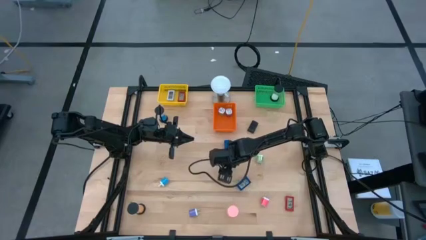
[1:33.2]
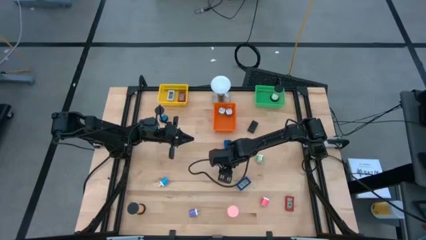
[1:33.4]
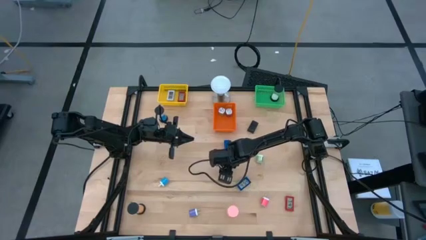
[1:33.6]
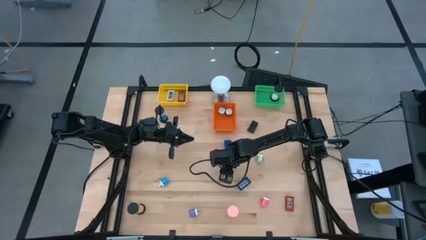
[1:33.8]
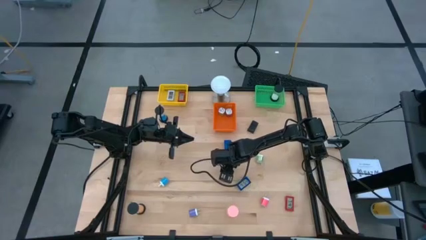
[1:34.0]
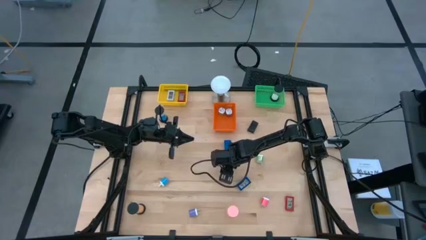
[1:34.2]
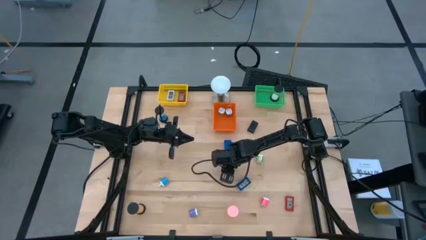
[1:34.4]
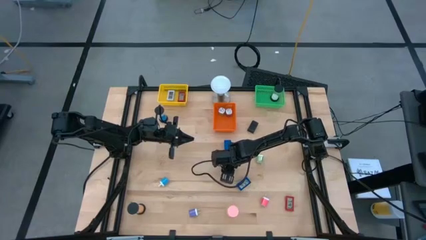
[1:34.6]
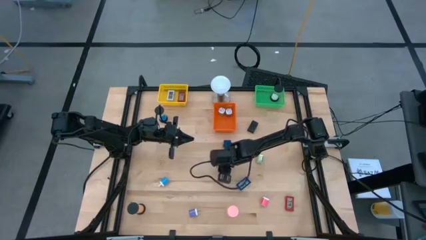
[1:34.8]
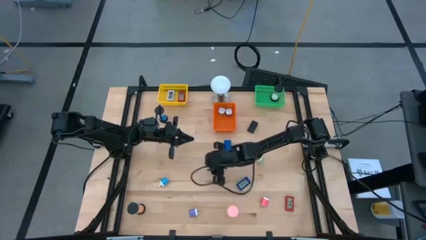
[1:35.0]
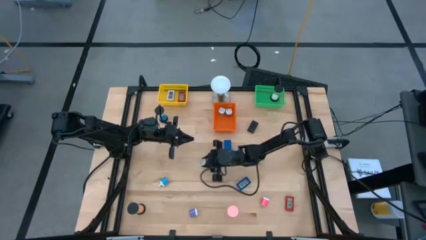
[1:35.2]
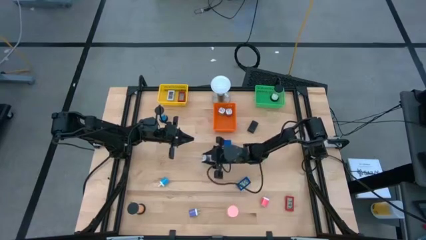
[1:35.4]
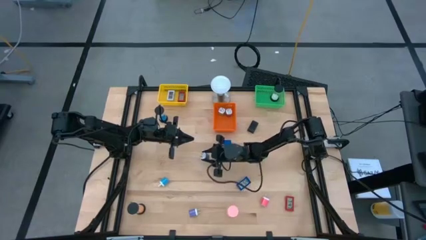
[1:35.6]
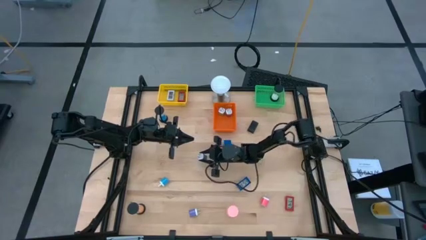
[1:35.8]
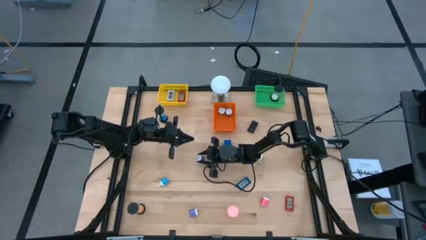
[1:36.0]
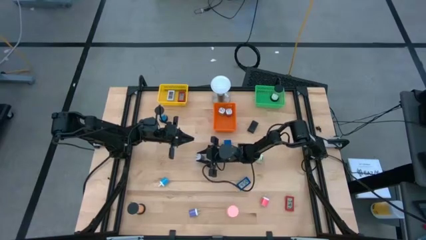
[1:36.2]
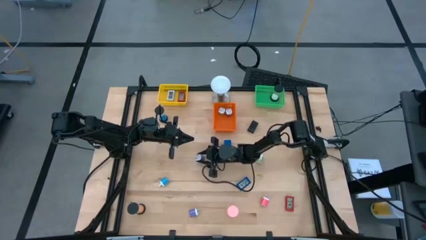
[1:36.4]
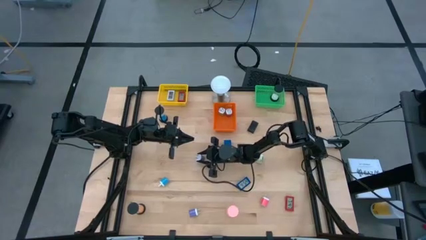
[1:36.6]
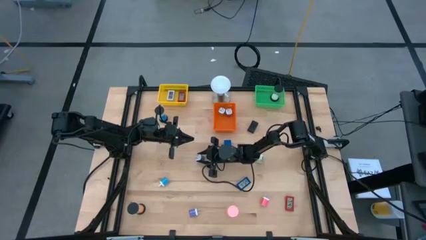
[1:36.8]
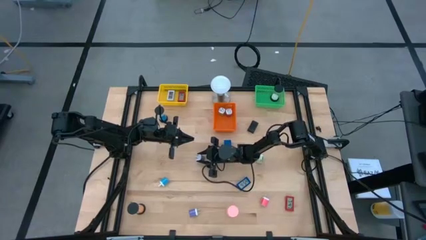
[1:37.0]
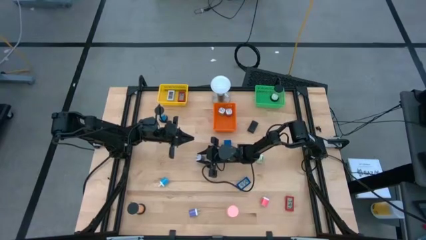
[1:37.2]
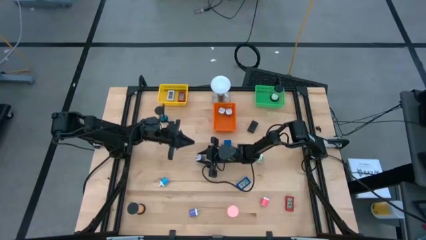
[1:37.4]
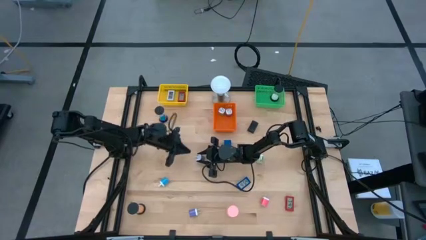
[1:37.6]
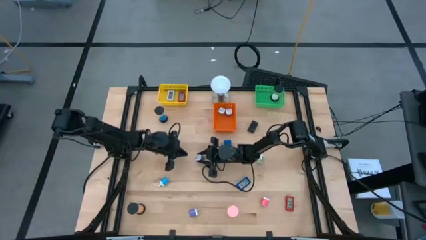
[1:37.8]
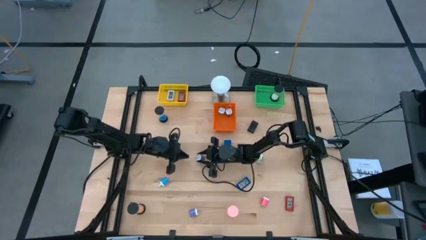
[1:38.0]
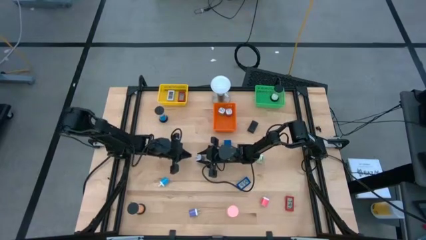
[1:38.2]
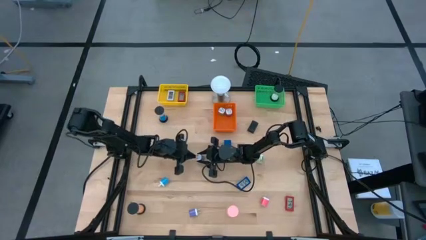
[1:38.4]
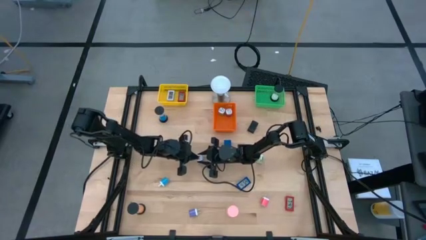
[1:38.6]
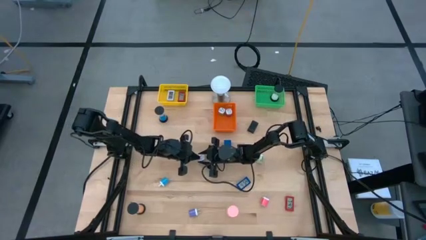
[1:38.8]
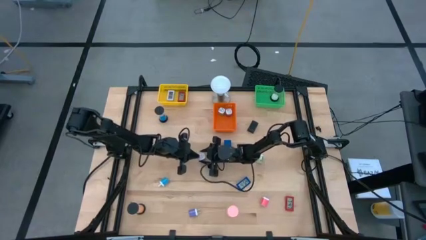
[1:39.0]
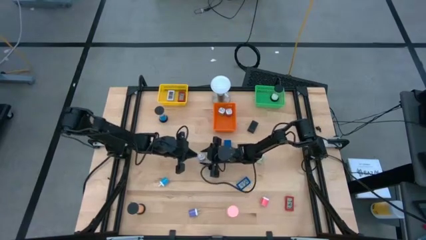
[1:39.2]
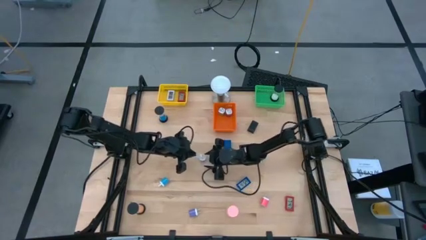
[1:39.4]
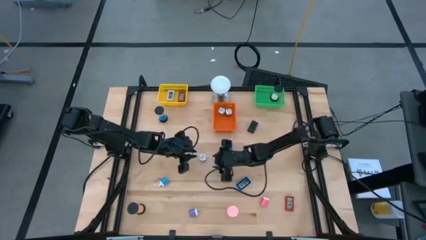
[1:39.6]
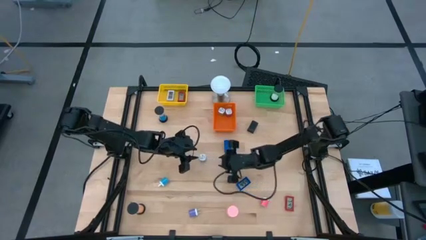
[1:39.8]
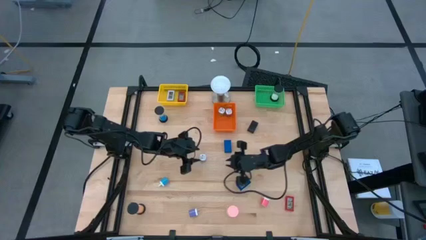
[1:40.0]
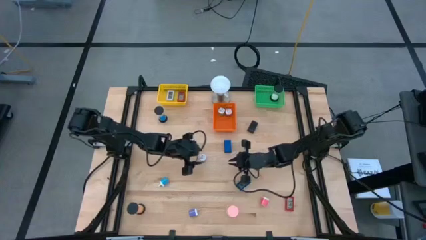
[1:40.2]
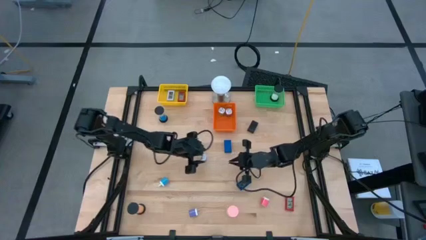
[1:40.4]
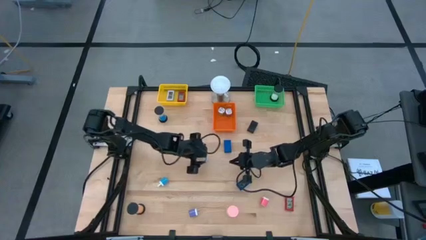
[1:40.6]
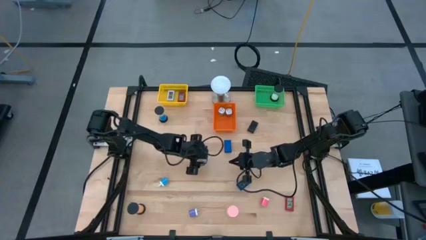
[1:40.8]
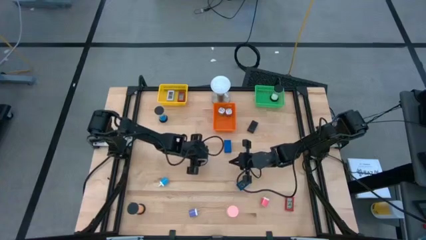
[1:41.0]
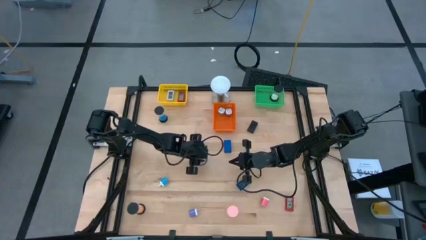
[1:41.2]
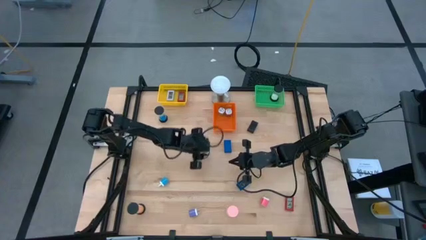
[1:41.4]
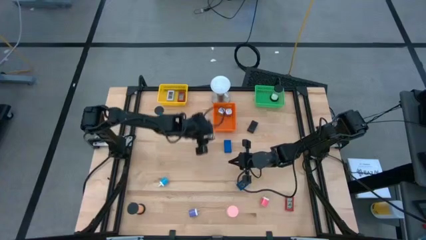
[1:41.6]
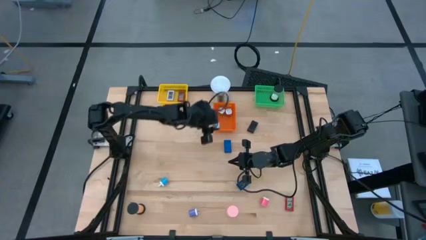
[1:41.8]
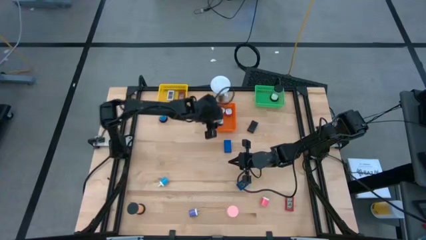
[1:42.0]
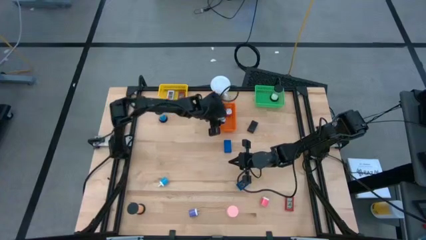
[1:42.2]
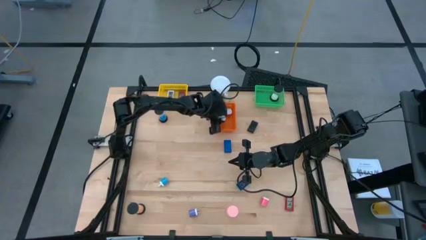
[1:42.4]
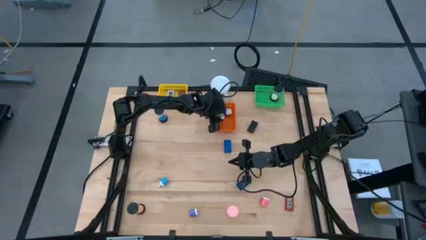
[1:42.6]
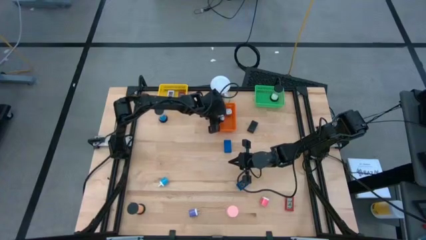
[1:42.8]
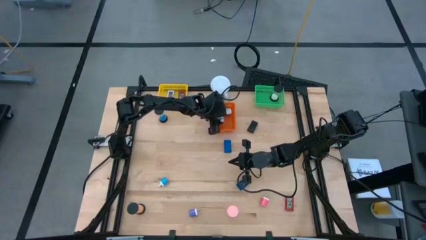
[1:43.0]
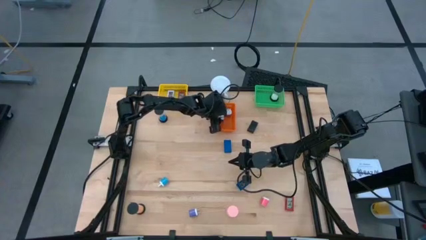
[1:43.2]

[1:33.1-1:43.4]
Task: Pick & Place Office items
Put the top purple charger adapter into the orange bin

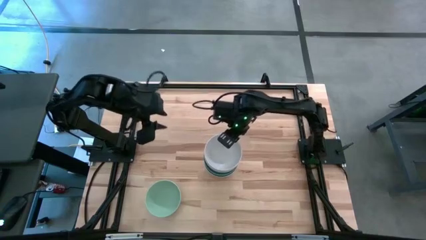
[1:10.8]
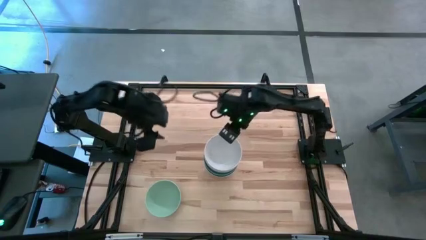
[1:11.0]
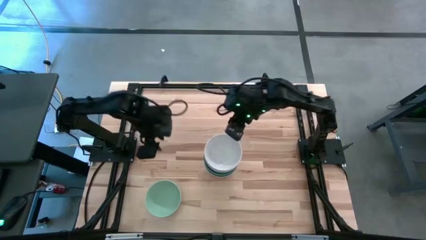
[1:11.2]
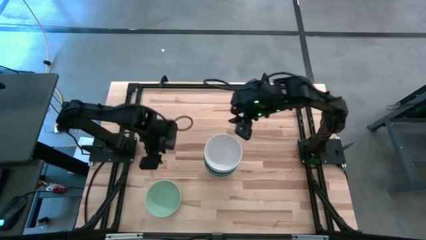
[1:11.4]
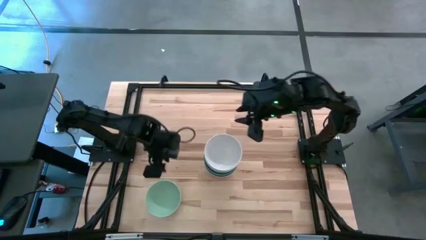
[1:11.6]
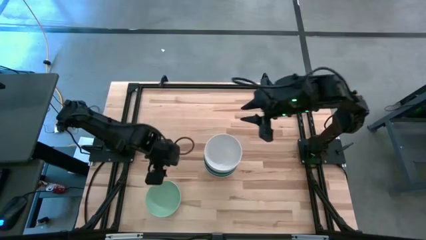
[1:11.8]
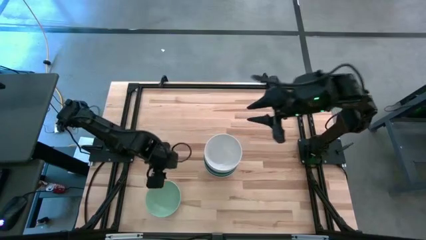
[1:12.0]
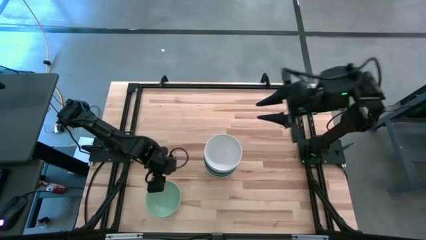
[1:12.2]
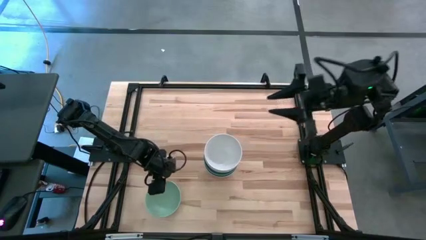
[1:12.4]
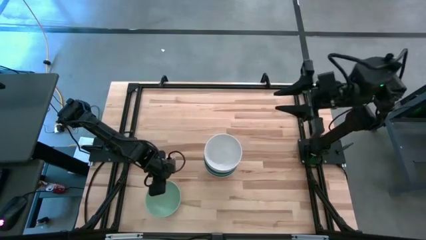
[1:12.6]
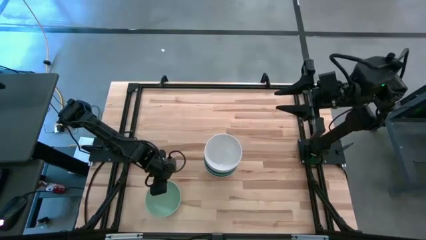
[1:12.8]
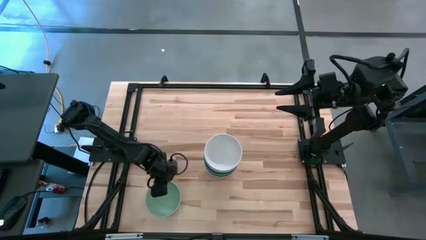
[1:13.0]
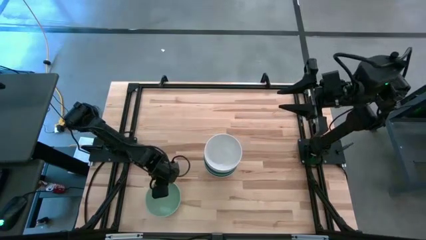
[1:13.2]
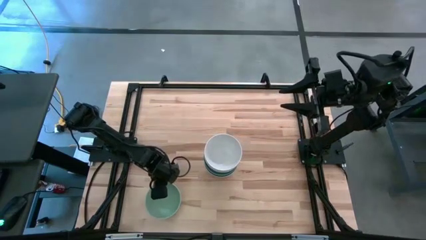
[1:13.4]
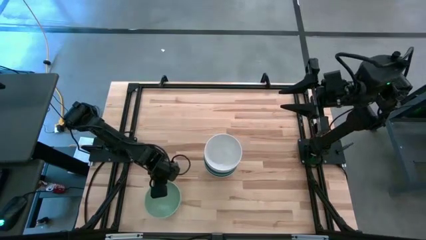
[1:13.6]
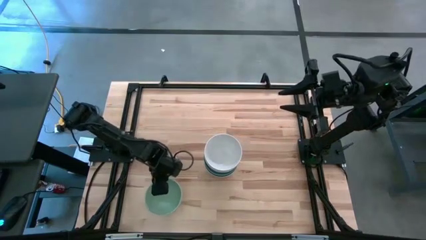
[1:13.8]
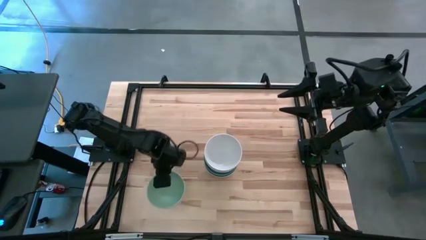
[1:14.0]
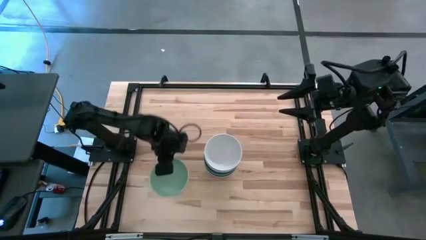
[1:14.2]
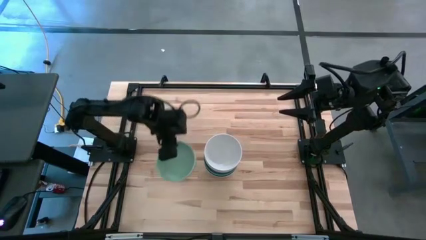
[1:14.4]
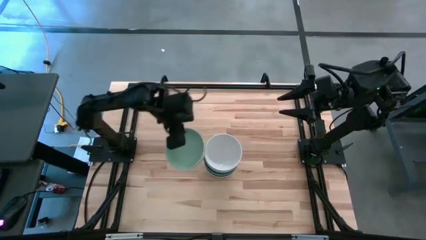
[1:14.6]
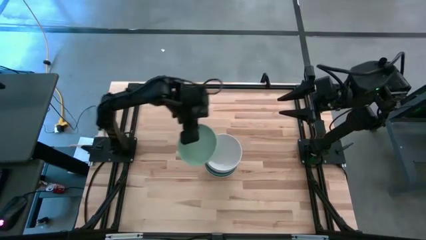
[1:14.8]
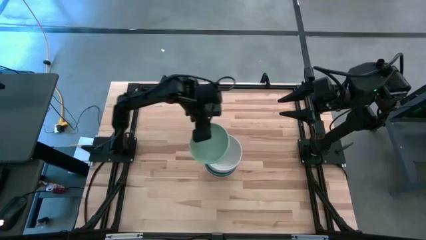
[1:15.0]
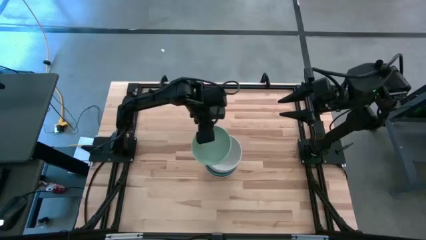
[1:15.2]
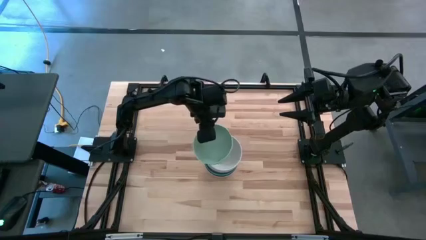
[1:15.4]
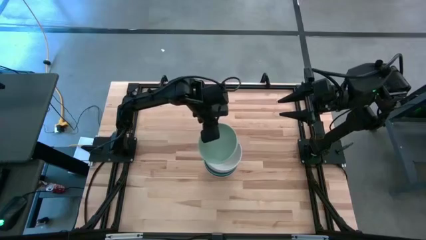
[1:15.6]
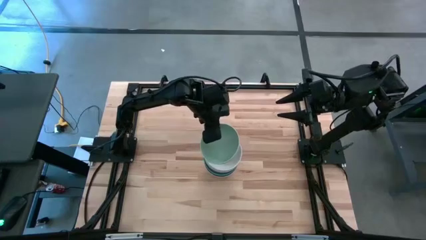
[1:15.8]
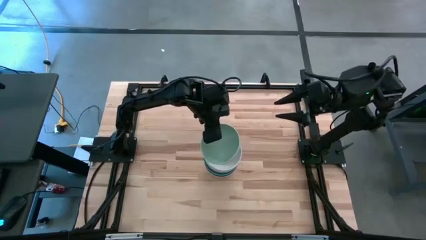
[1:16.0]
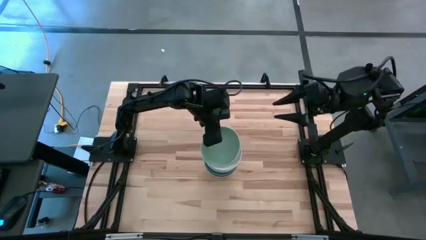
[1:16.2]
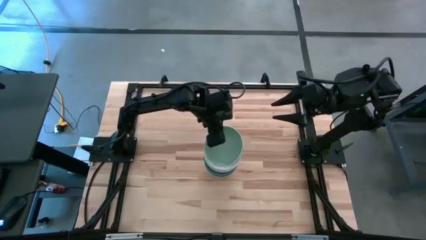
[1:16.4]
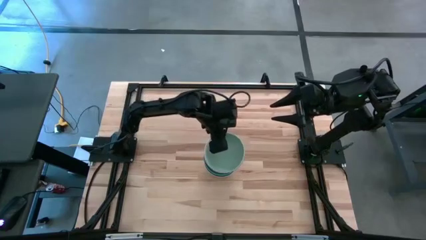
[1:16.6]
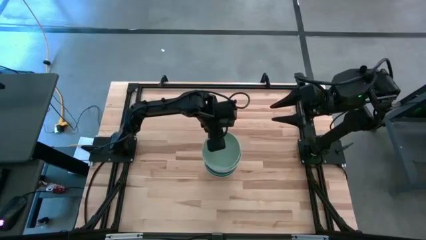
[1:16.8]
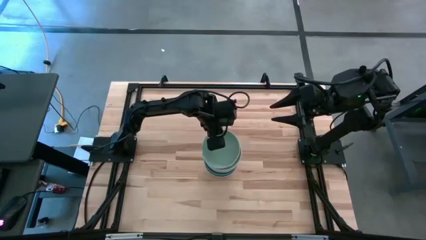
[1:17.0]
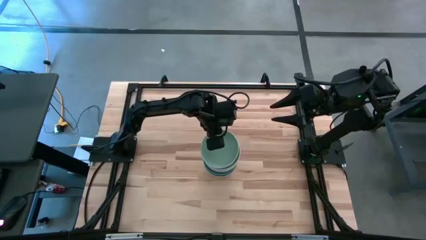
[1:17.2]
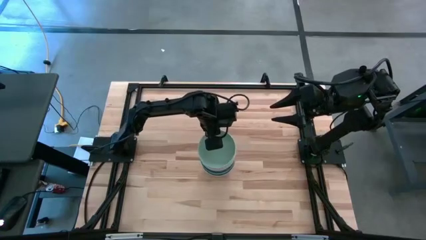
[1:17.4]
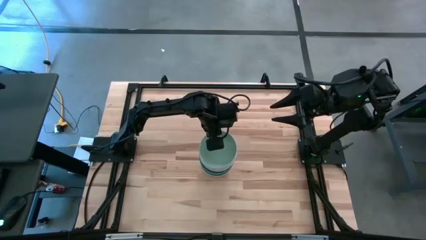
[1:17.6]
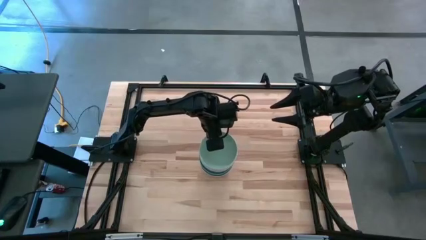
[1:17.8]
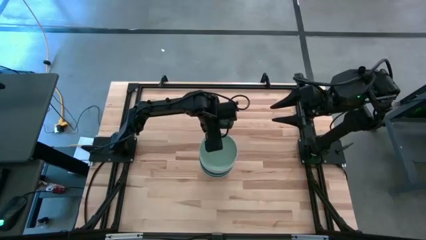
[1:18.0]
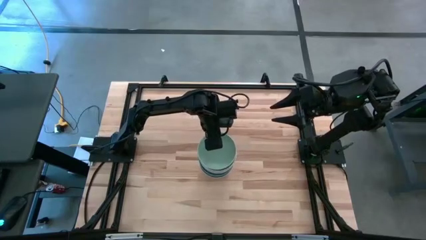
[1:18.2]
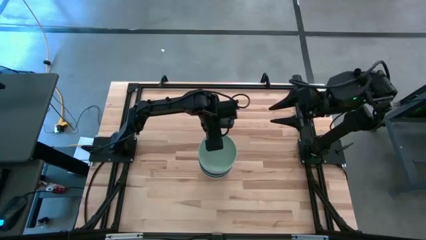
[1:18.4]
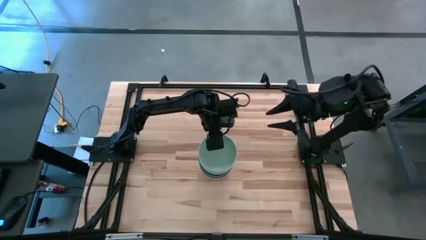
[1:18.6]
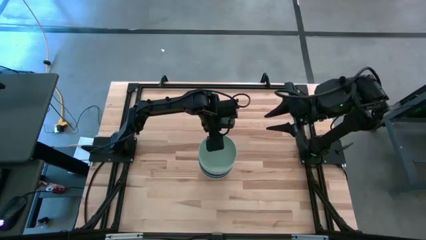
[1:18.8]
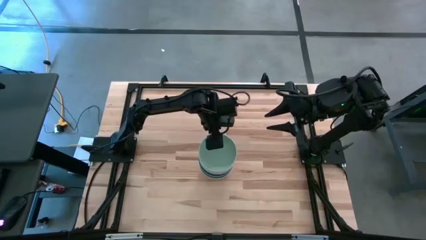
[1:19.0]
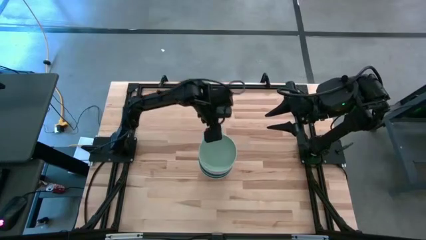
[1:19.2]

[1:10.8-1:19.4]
Task: Nest bowls inside each other
Stack the light blue bowl on top of the white bowl
